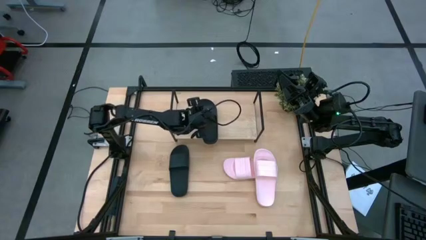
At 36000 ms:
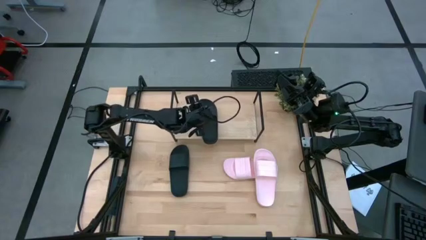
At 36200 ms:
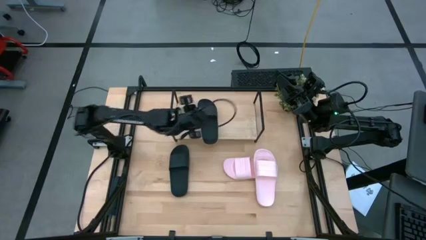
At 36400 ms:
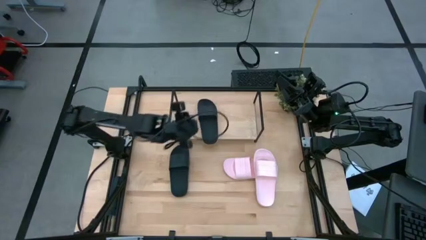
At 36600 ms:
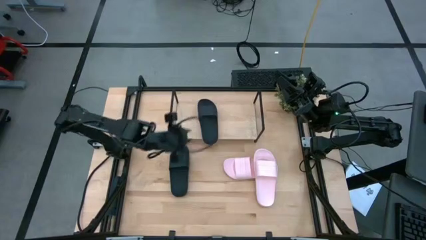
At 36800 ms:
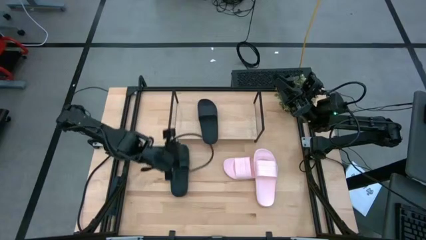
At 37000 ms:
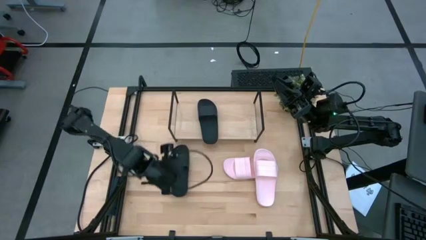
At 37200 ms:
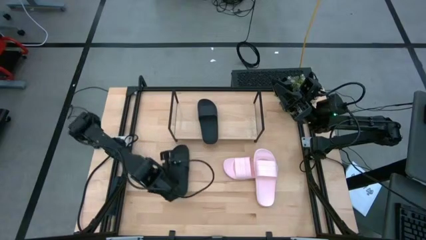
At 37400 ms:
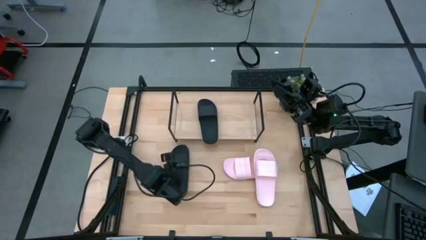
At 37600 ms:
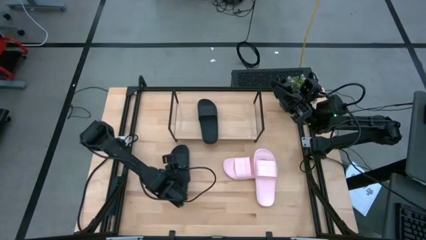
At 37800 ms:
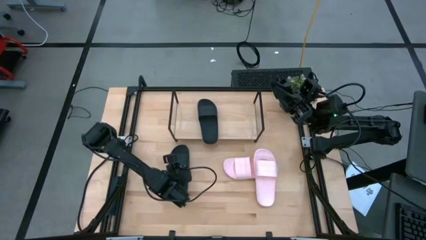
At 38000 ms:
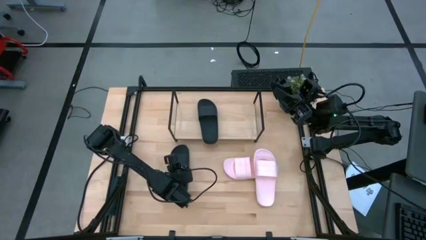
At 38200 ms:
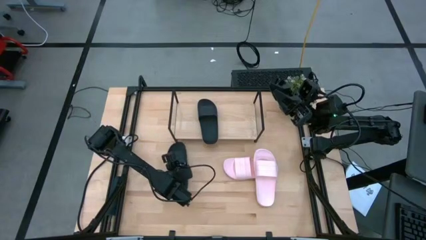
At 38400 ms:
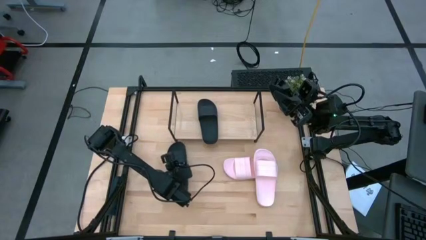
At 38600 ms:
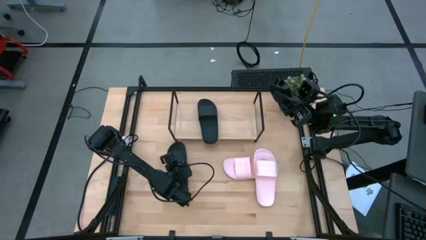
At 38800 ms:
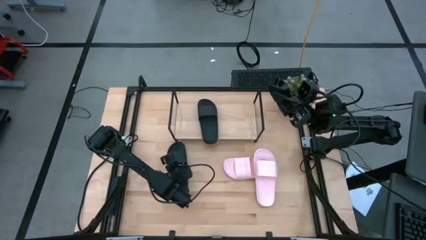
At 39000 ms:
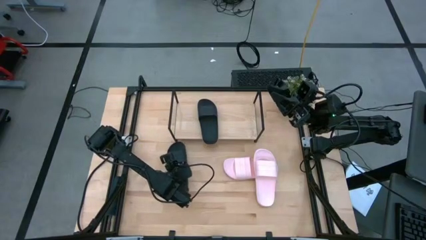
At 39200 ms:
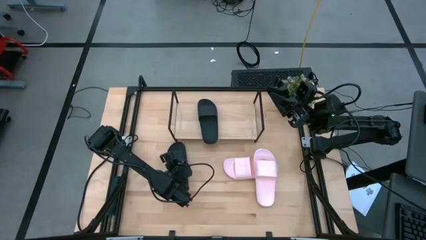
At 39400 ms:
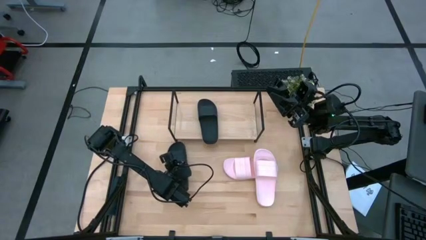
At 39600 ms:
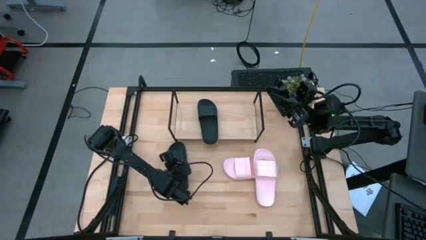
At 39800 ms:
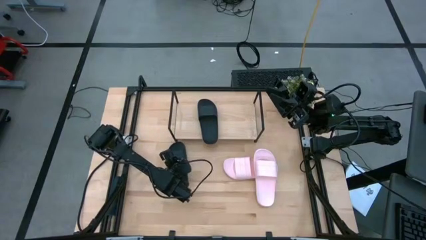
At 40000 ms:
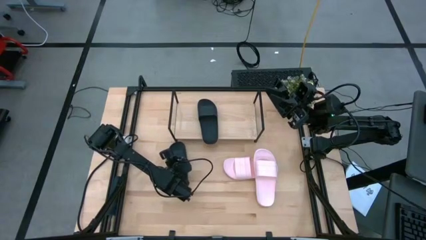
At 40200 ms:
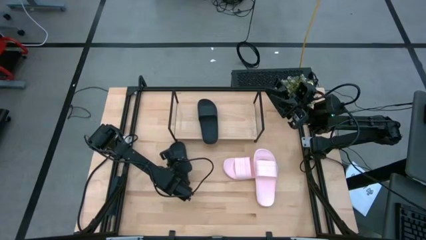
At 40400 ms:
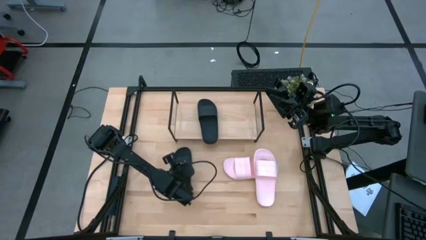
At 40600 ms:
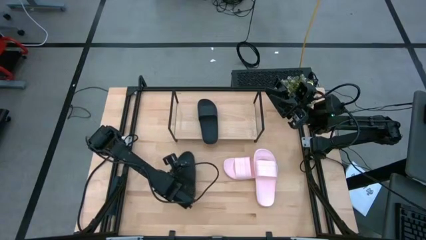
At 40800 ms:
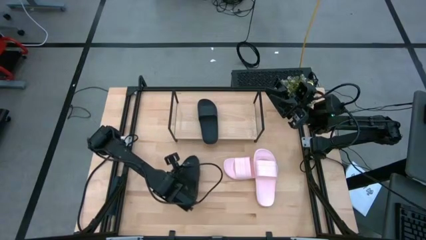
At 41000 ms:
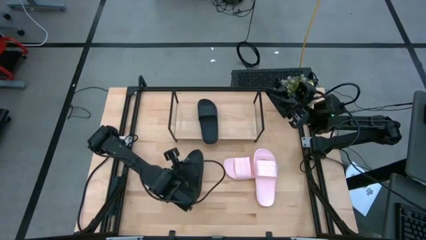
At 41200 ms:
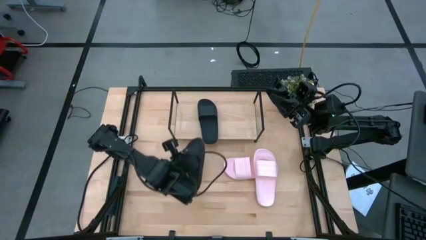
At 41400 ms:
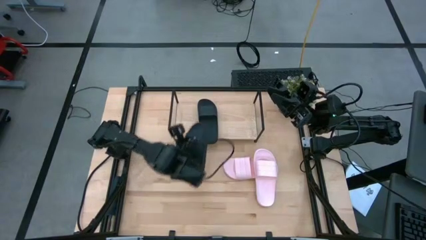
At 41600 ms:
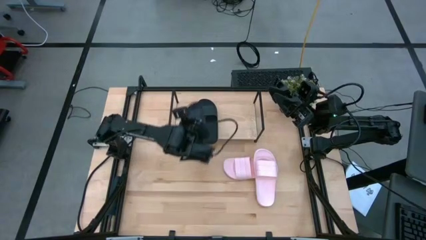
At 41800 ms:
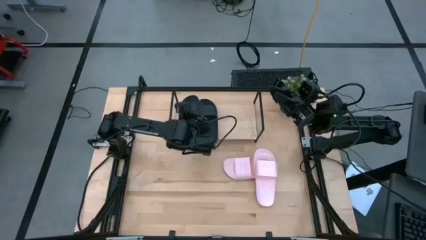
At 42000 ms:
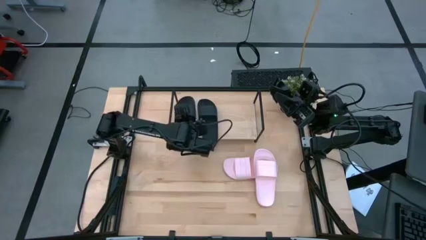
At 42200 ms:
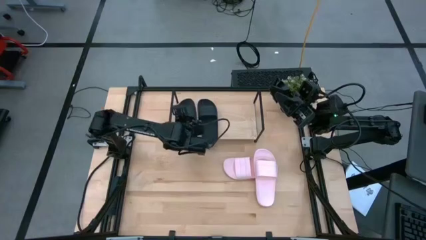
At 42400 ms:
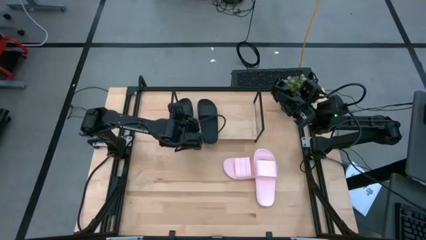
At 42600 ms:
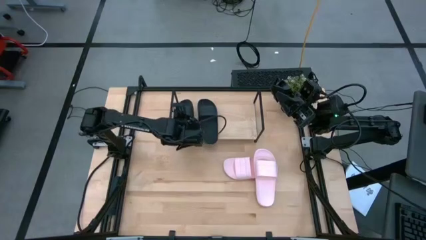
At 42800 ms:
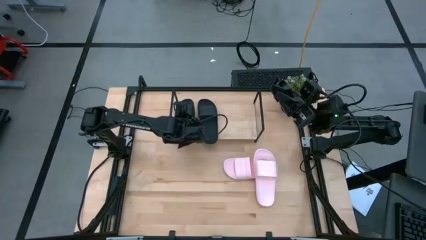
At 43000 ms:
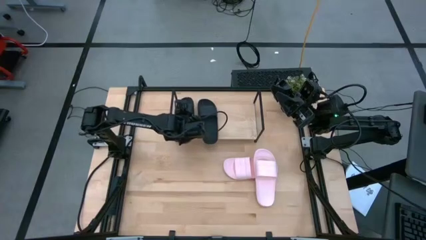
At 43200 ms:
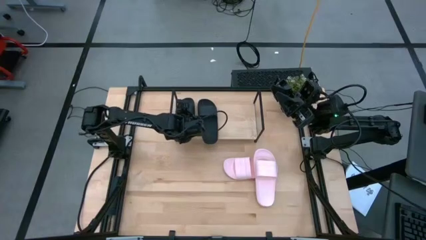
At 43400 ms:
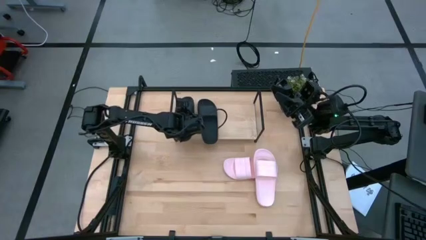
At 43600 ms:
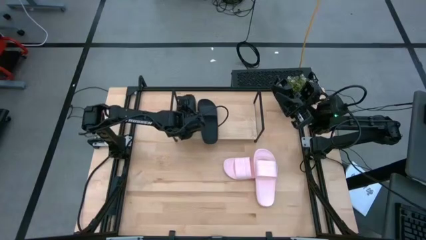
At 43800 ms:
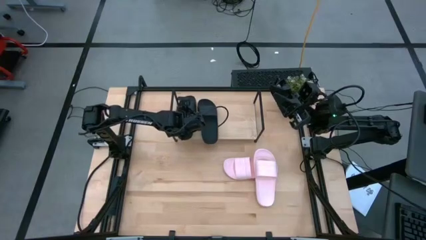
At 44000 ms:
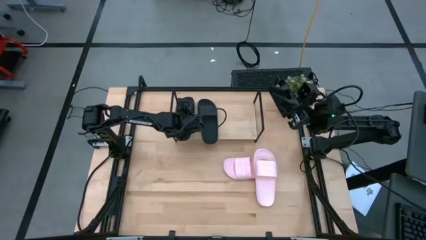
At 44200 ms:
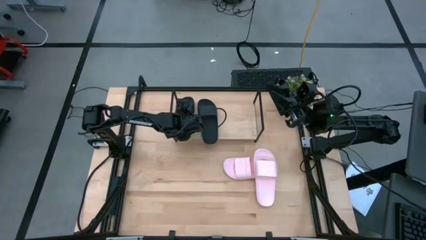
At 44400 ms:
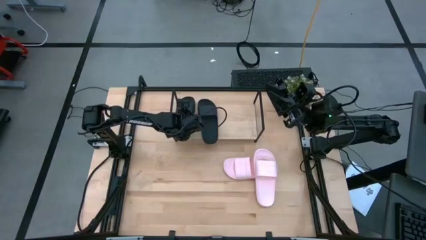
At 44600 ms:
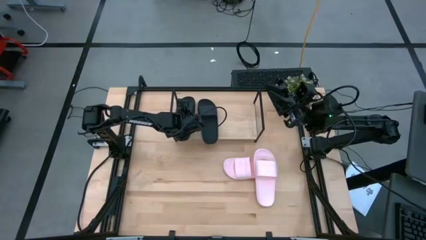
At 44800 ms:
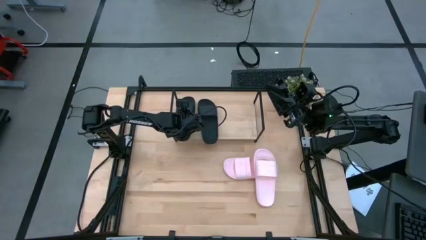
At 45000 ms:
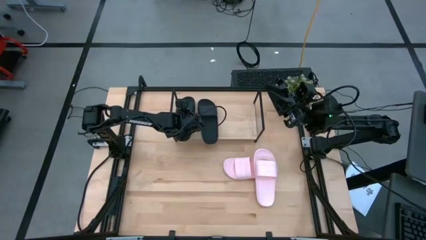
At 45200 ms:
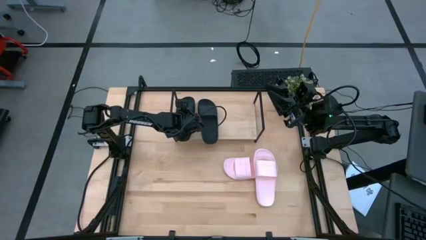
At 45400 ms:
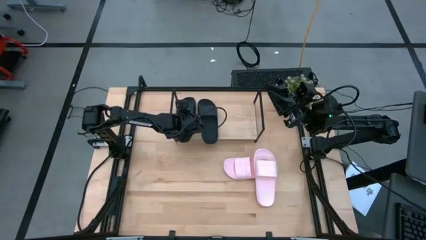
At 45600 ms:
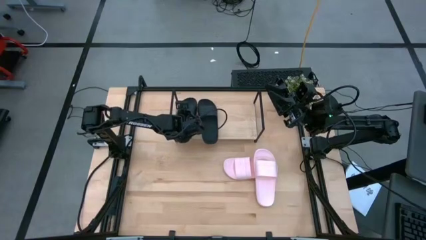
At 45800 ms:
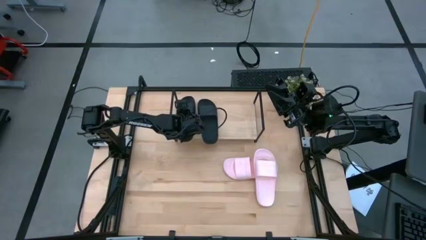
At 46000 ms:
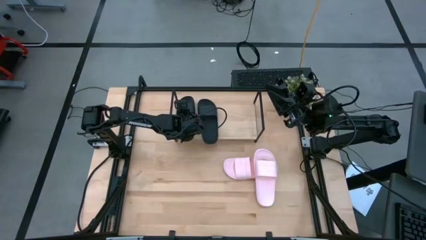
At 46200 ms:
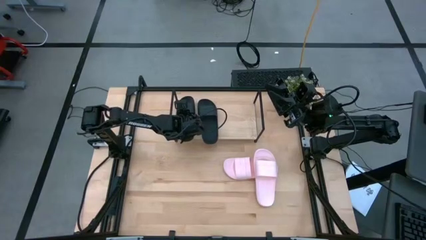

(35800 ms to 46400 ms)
Task: Pick and place slides into the shelf
Put the black slide on the shelf
